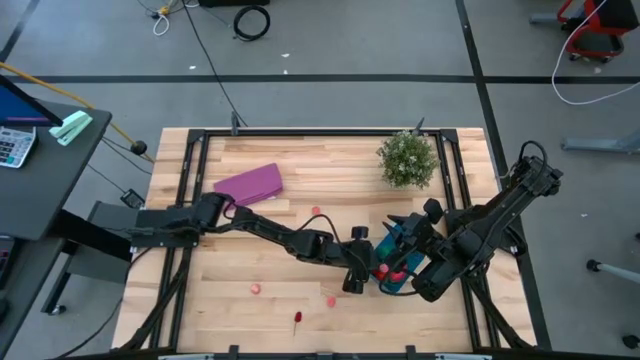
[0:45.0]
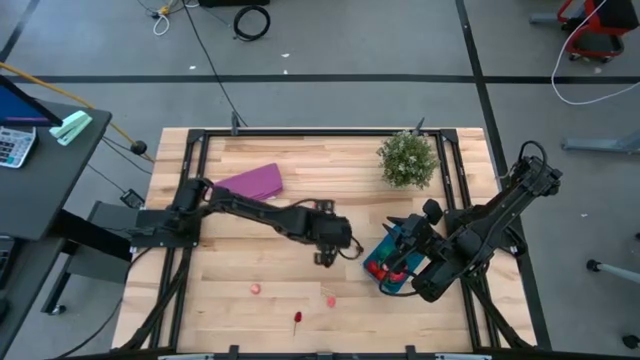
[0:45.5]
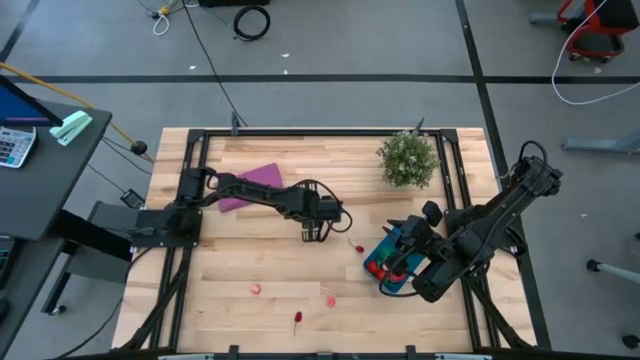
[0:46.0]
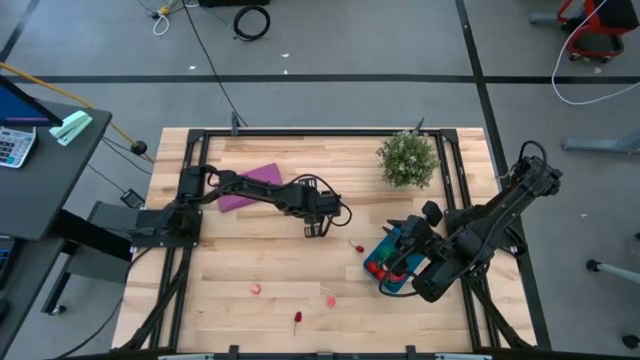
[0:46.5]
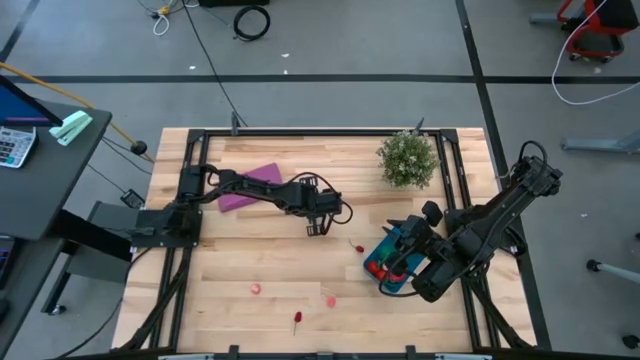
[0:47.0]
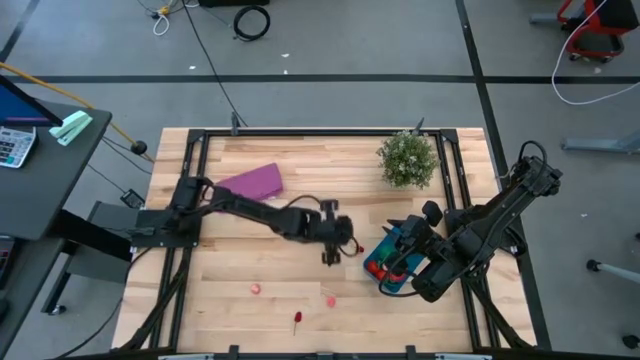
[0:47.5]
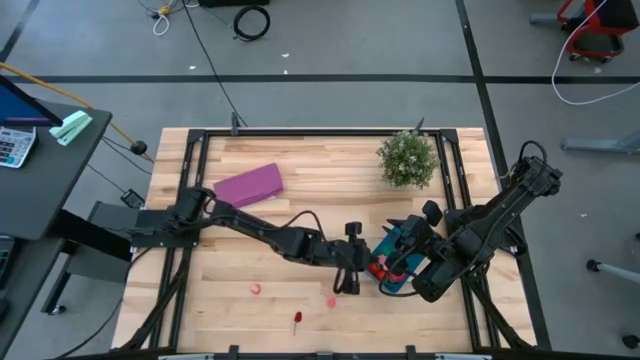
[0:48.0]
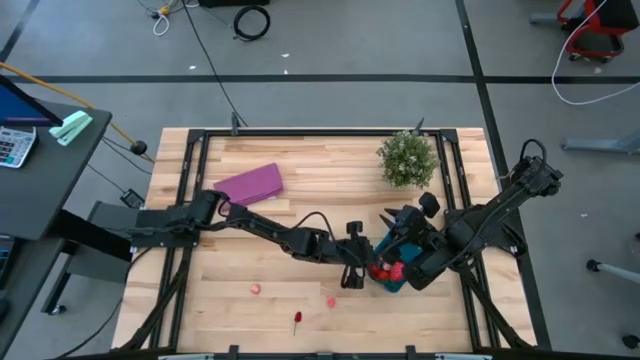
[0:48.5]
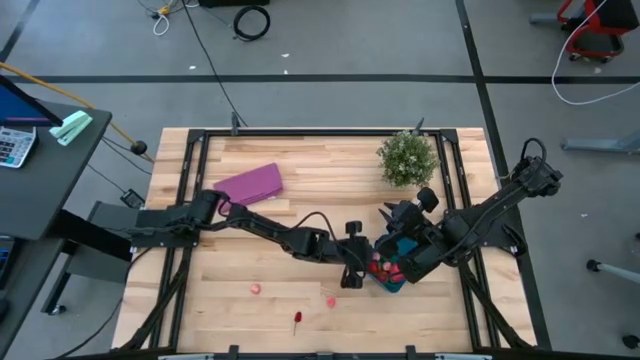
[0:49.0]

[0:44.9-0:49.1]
Task: Pick and placing Produce into tupperware
Put the pink peach into the blue bin

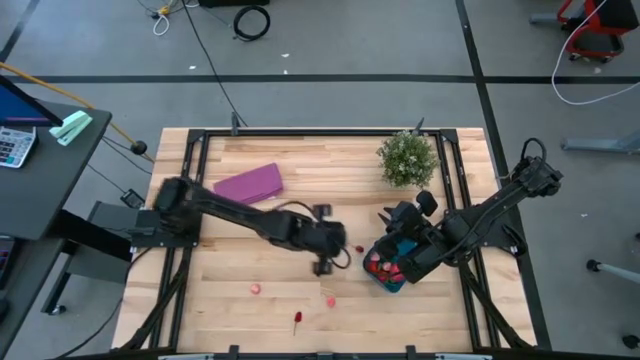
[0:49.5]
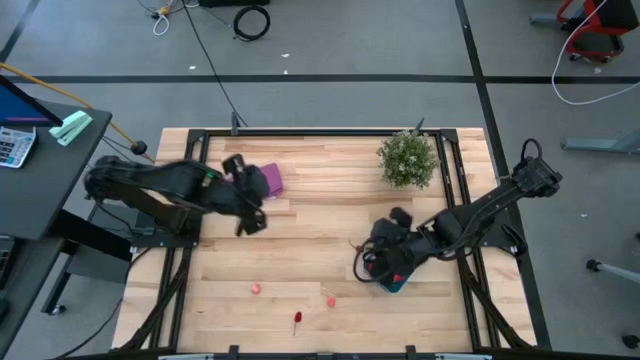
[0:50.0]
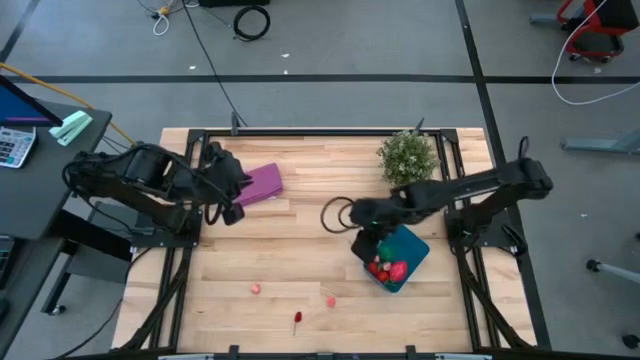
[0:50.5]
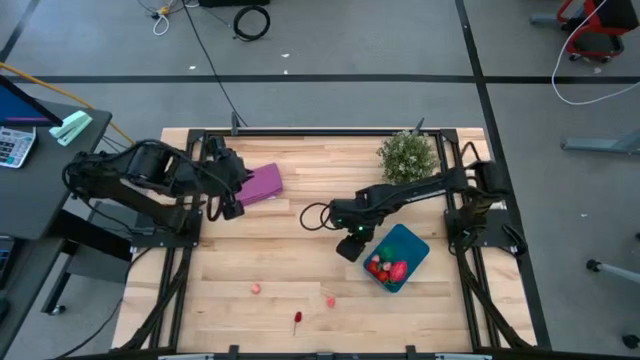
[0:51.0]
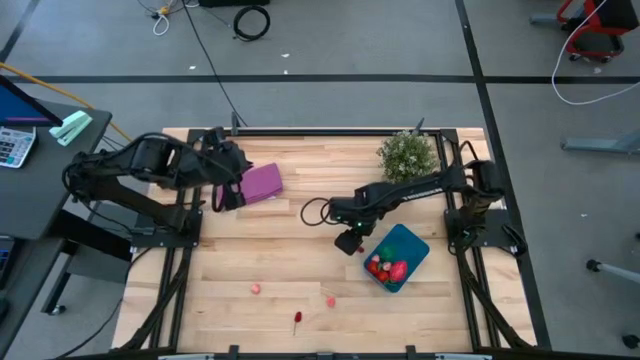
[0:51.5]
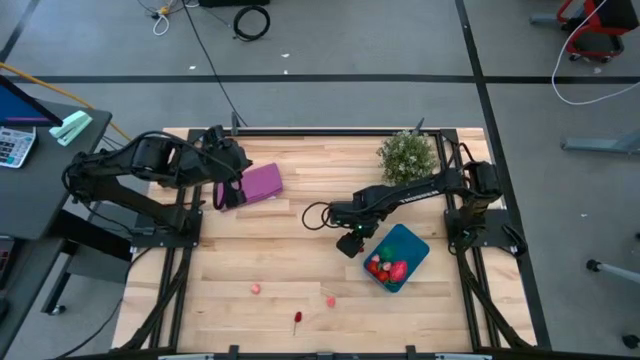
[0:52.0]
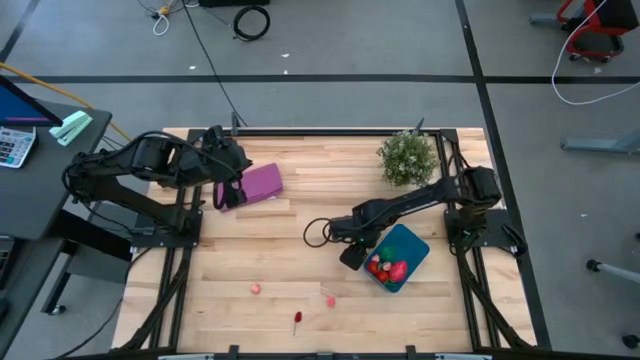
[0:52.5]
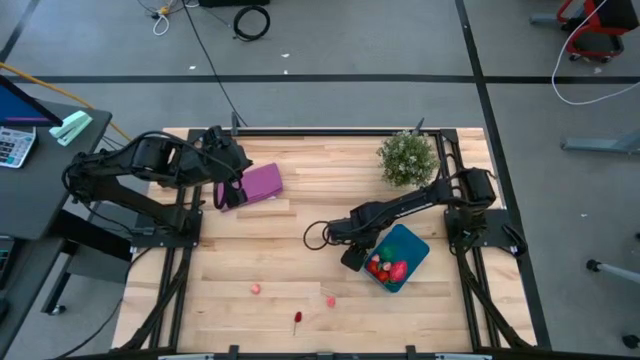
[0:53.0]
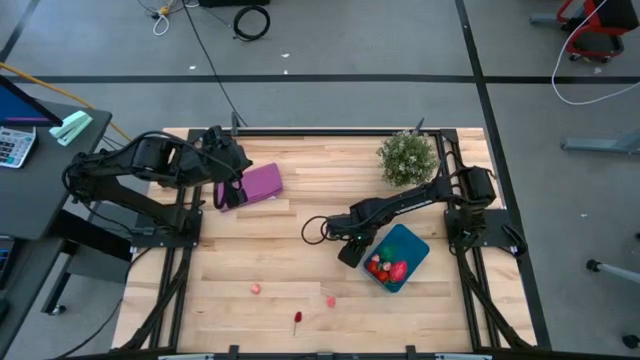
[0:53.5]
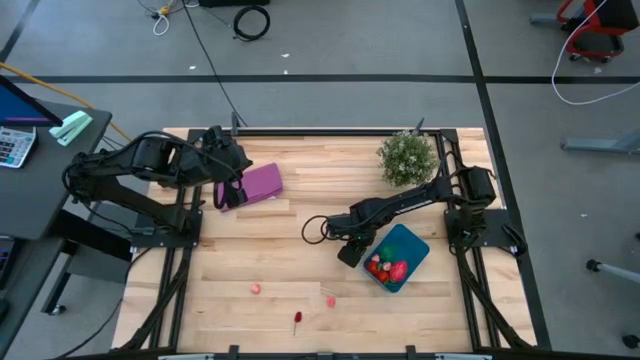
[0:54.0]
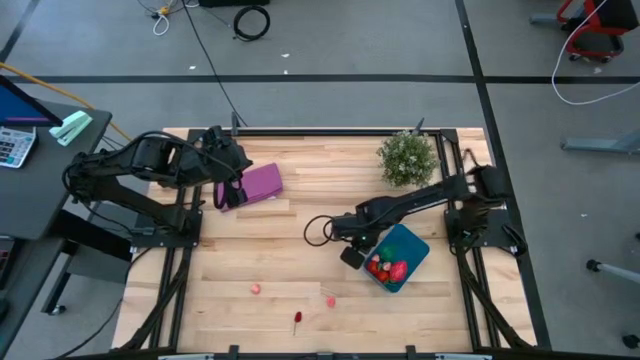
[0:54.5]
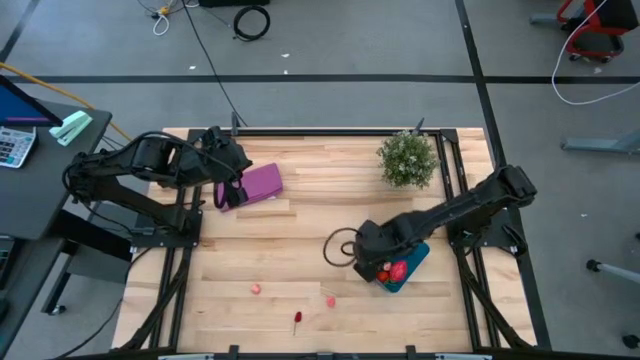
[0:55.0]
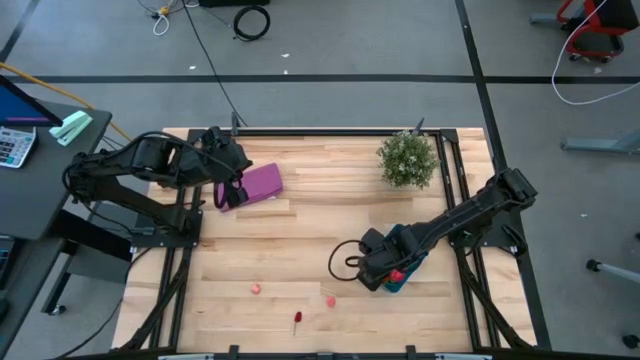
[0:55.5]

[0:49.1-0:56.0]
Put the red cherry into the blue bin

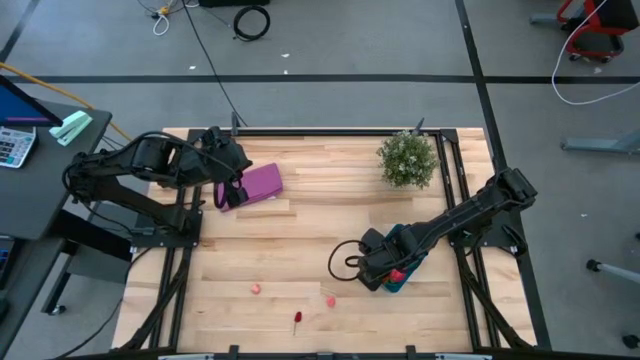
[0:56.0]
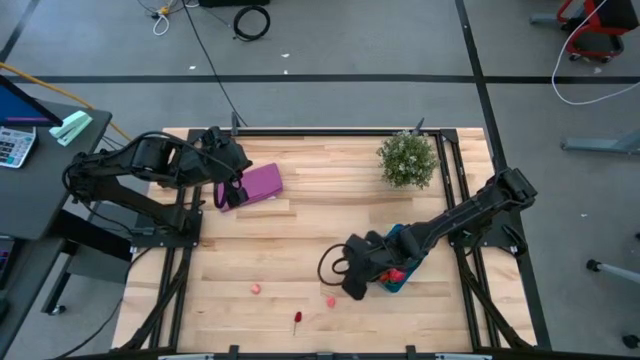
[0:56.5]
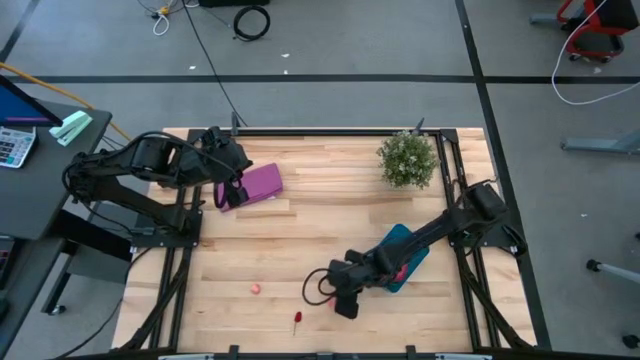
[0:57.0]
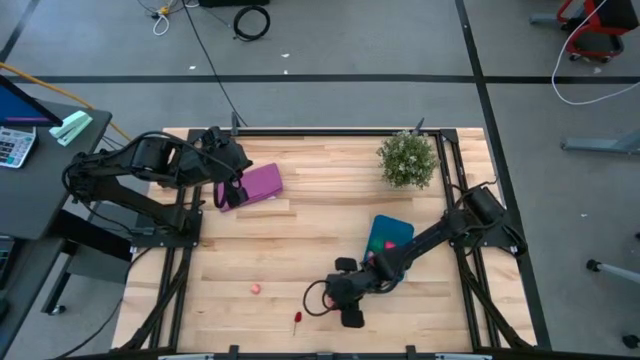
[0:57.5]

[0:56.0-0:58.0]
Put the pink peach into the blue bin

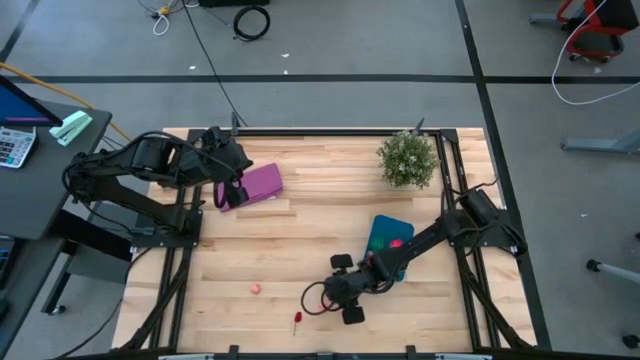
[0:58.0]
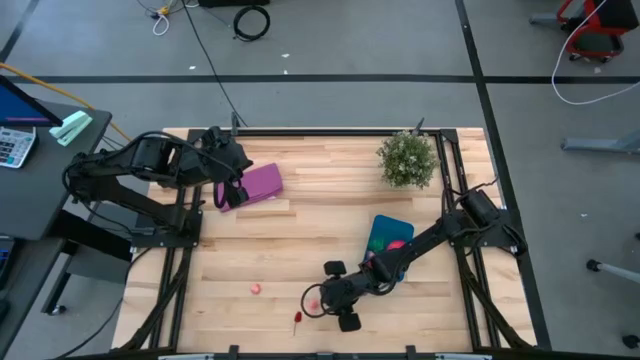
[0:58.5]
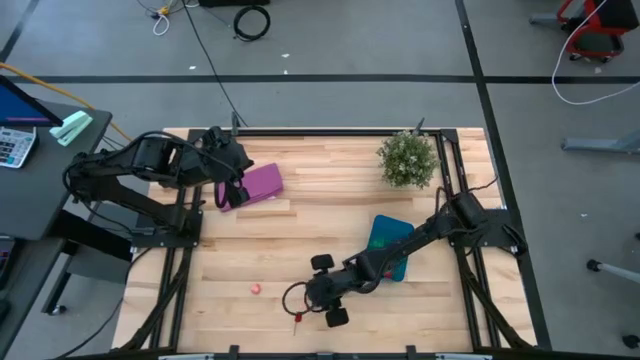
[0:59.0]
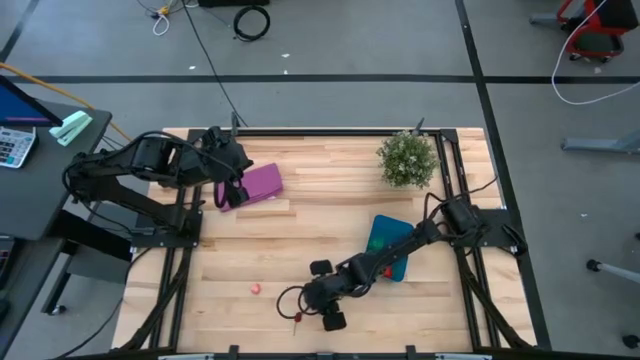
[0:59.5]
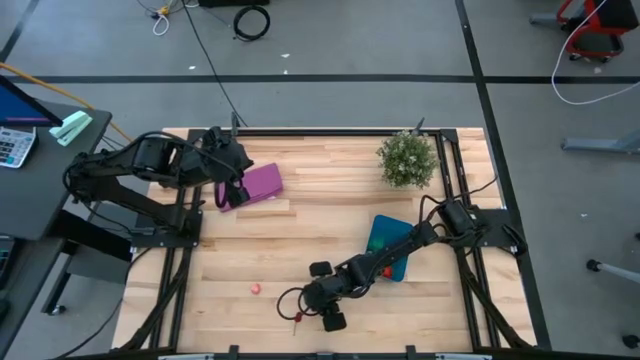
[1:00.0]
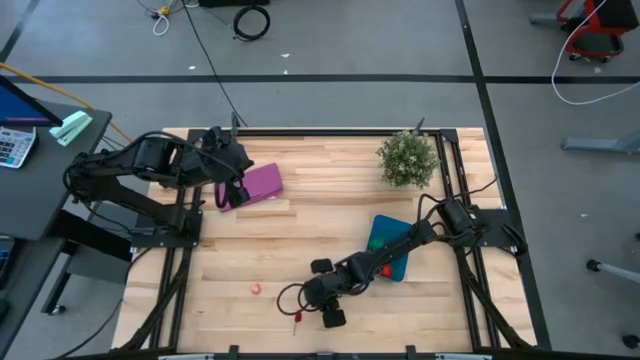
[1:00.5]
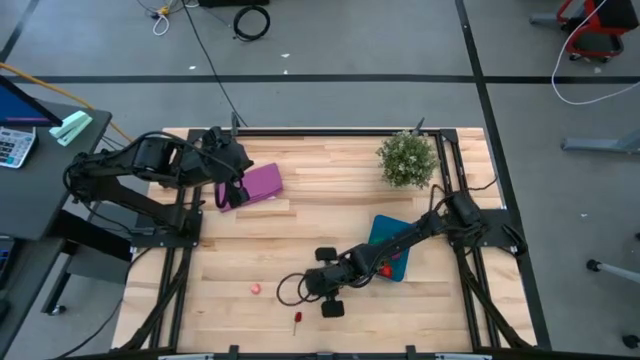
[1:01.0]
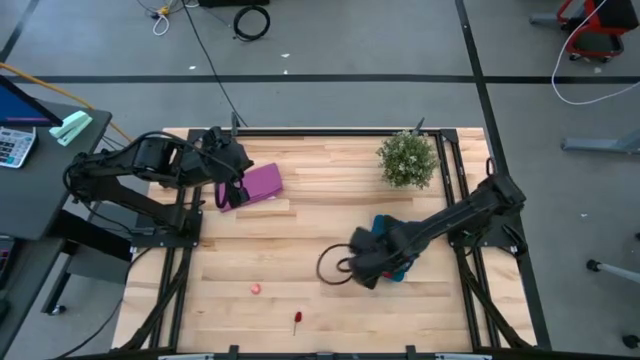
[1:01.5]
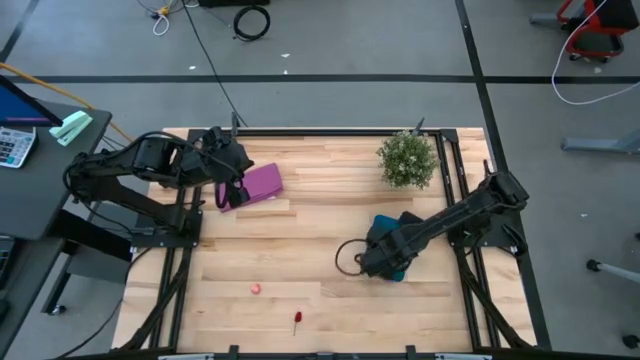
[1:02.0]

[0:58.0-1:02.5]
Put the pink peach into the blue bin

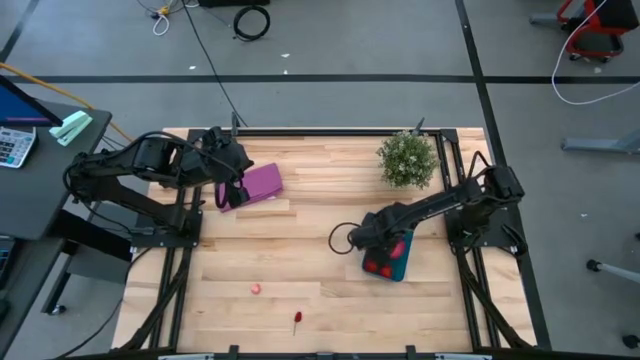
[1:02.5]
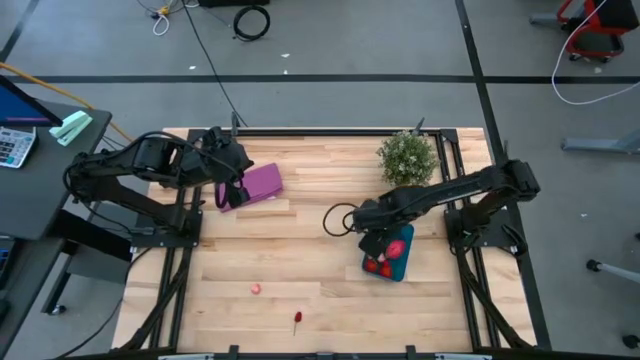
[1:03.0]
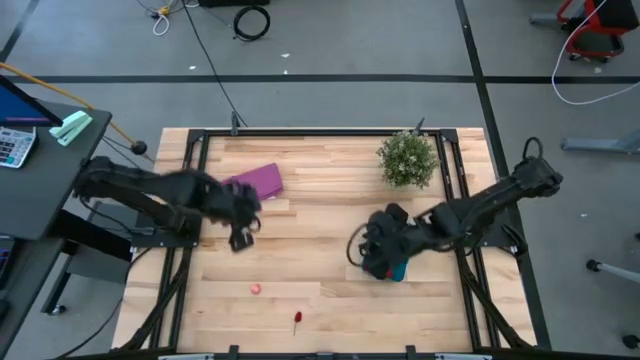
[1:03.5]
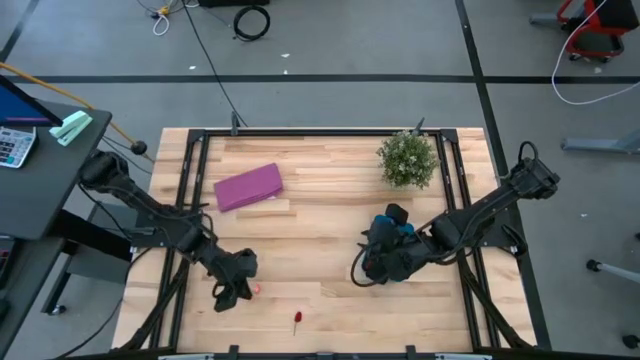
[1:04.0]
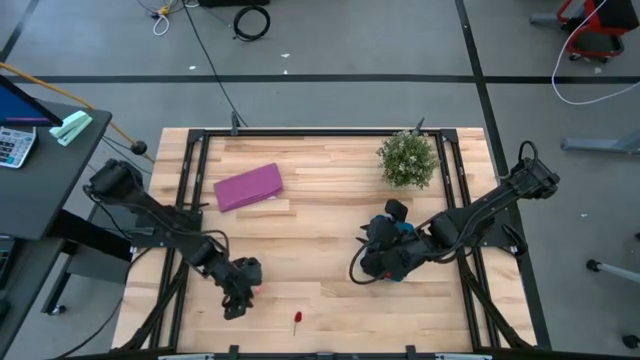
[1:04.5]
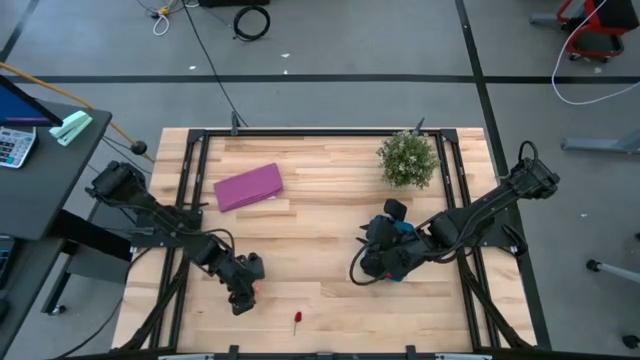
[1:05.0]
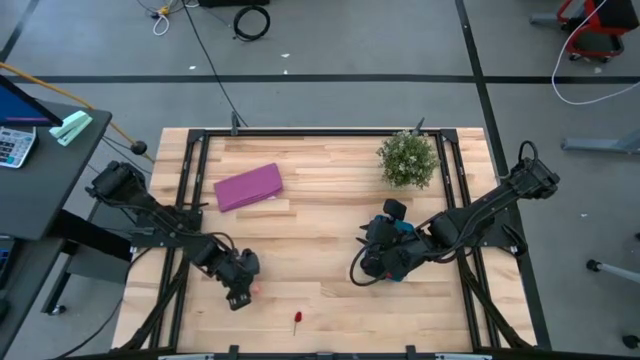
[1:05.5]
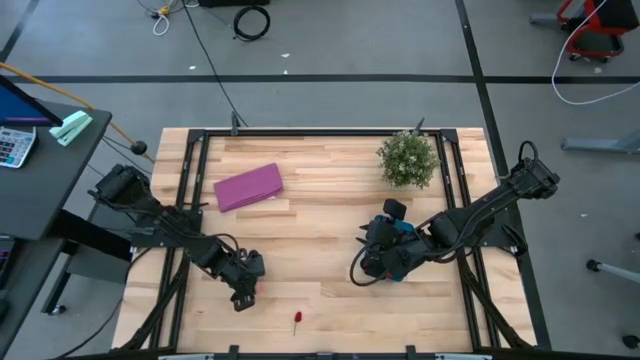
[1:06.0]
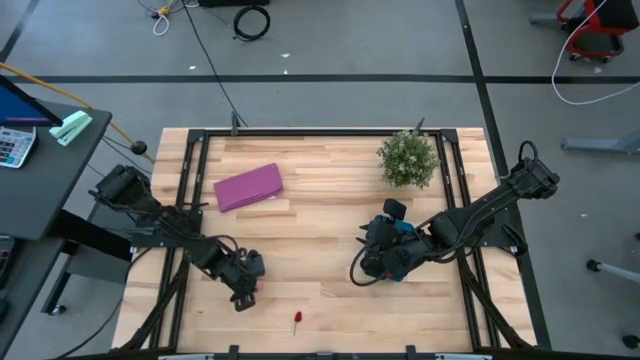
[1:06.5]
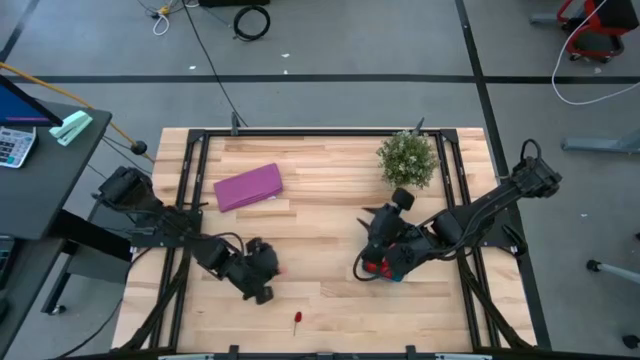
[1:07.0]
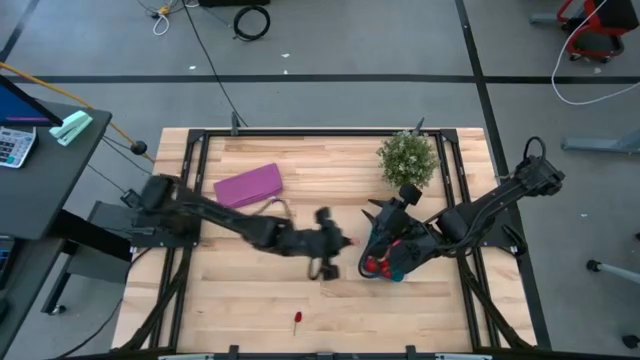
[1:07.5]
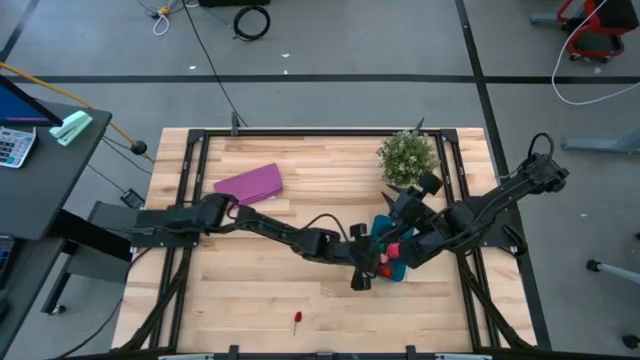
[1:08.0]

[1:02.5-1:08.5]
Put the pink peach into the blue bin
